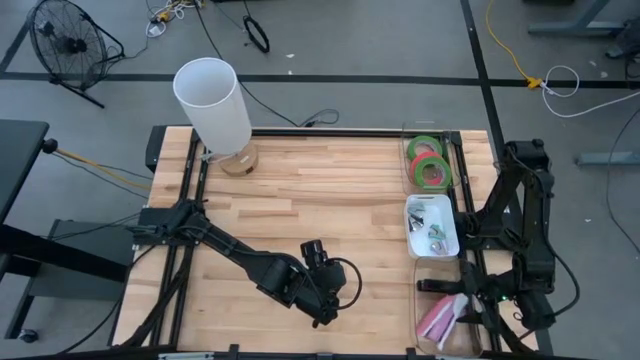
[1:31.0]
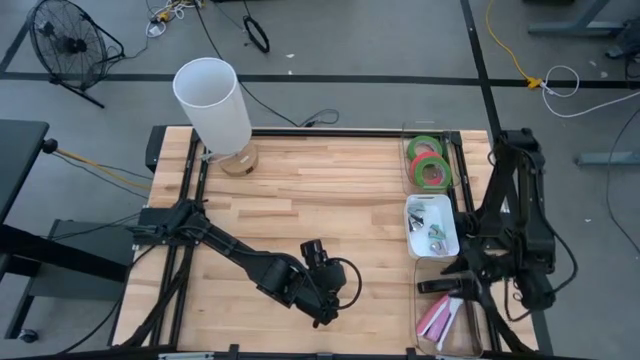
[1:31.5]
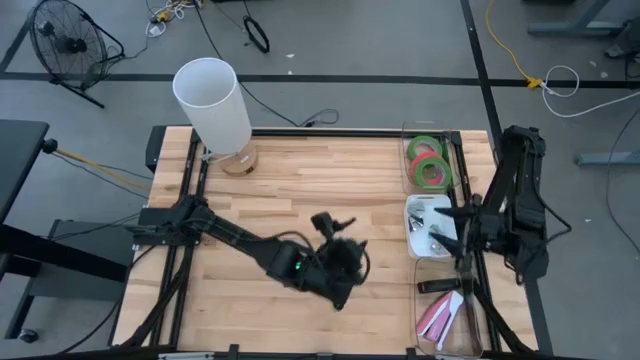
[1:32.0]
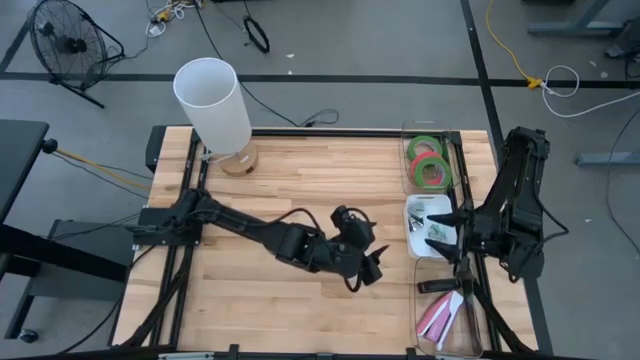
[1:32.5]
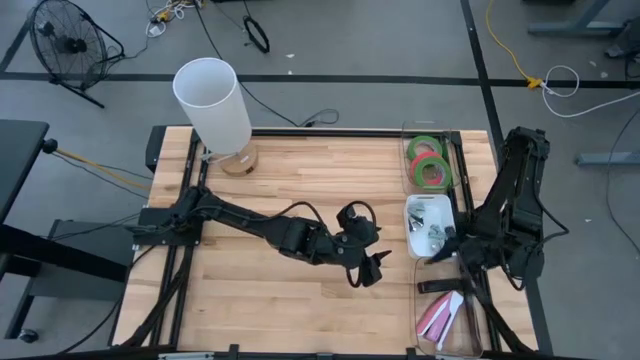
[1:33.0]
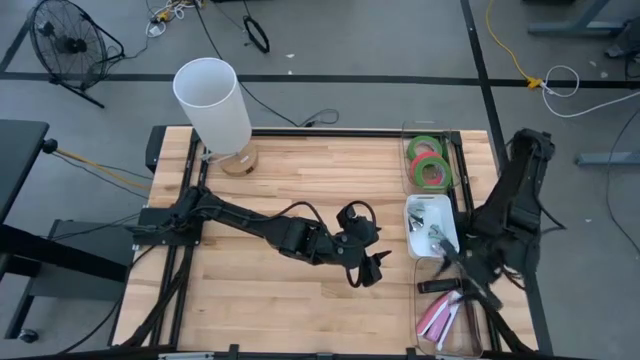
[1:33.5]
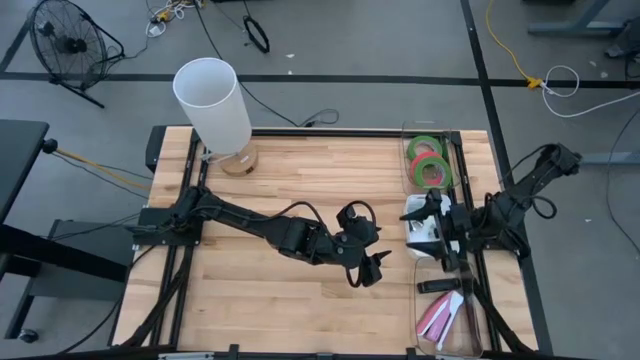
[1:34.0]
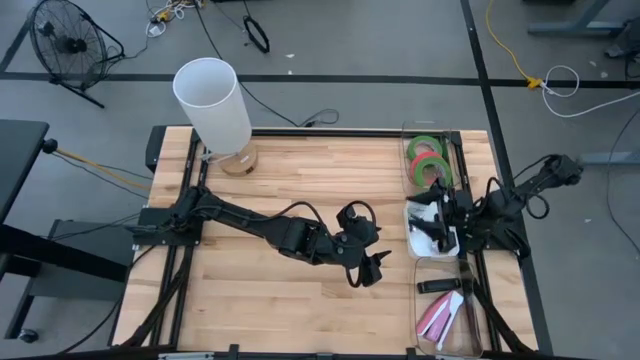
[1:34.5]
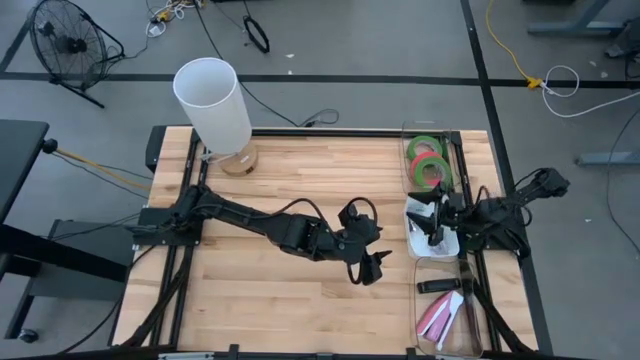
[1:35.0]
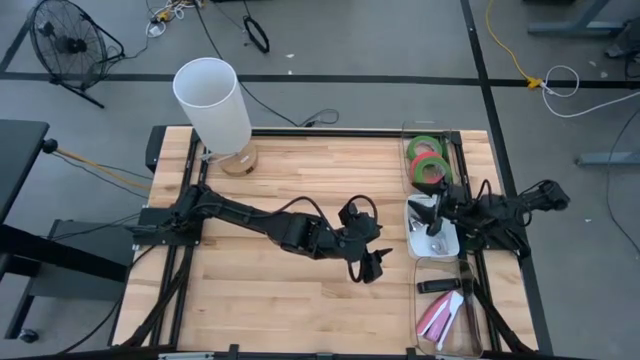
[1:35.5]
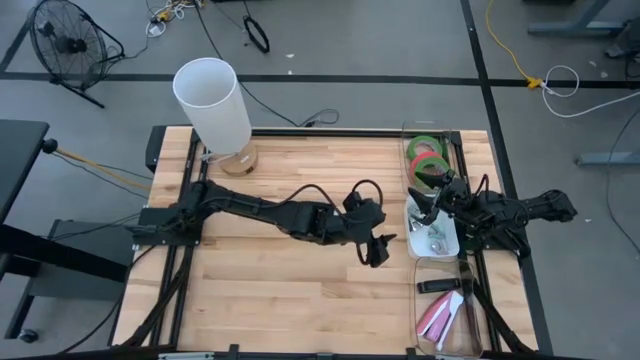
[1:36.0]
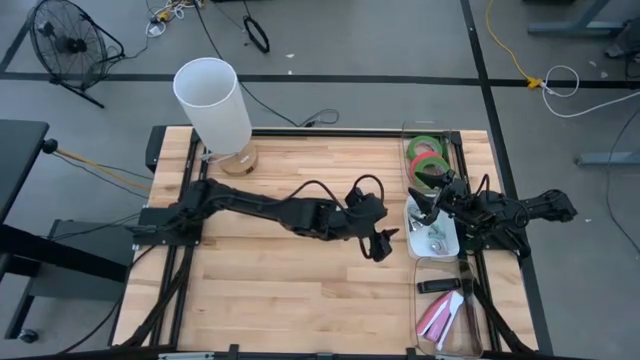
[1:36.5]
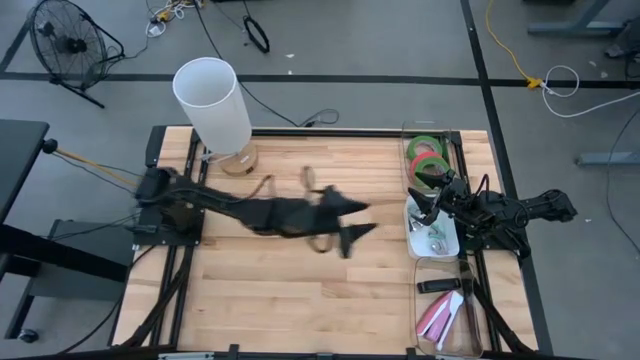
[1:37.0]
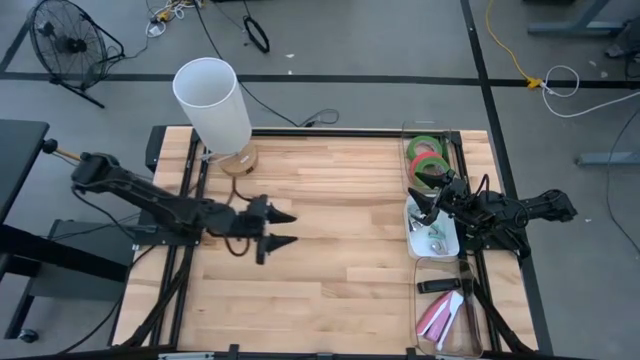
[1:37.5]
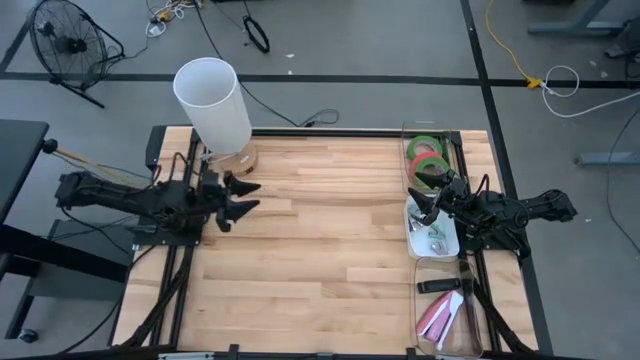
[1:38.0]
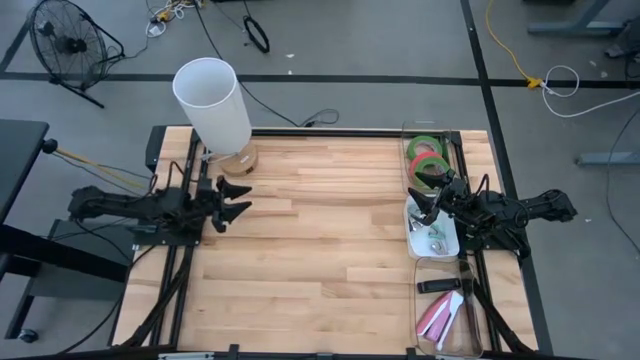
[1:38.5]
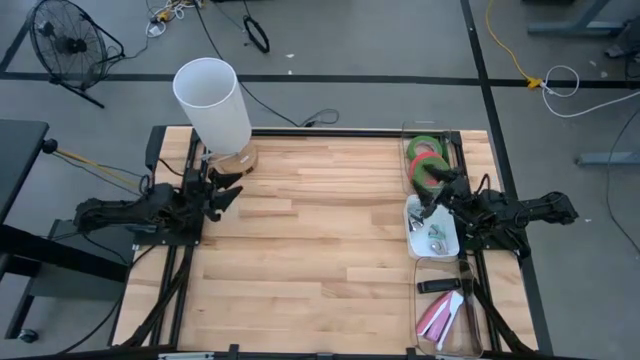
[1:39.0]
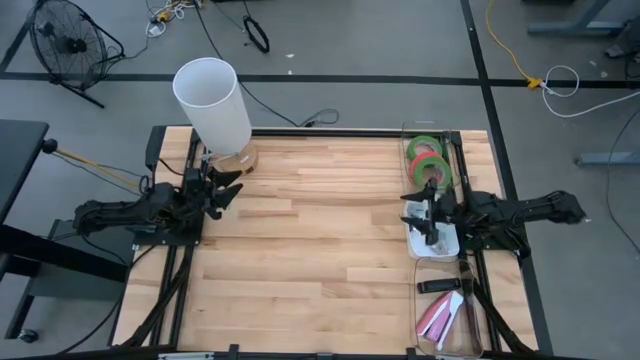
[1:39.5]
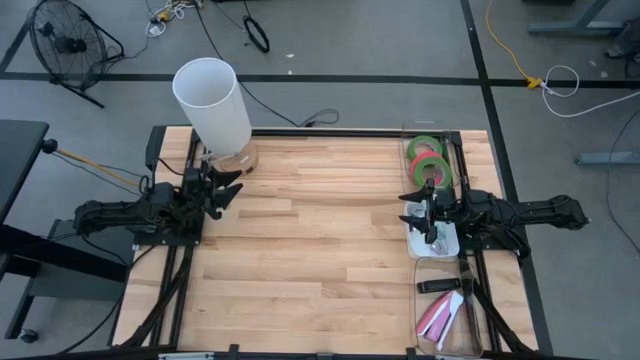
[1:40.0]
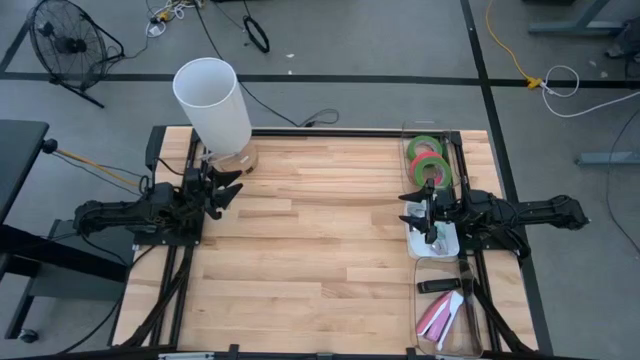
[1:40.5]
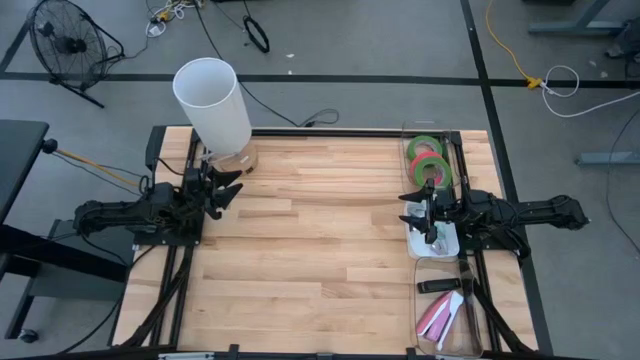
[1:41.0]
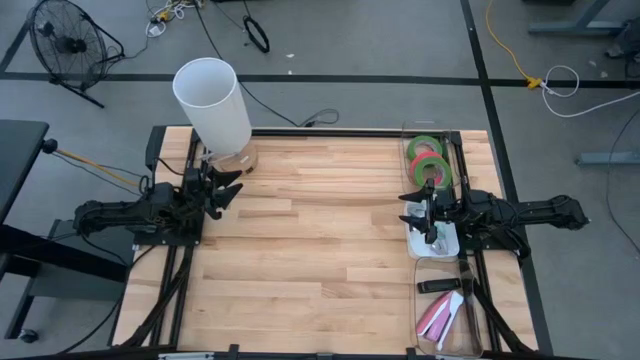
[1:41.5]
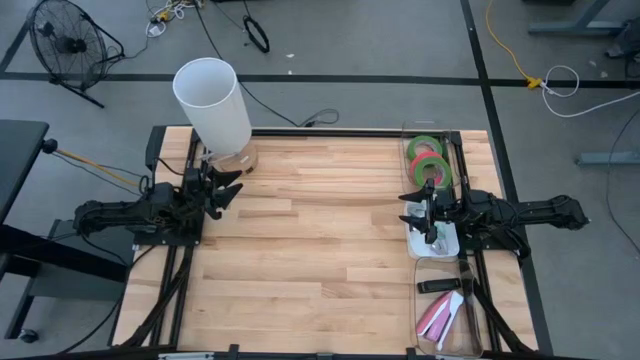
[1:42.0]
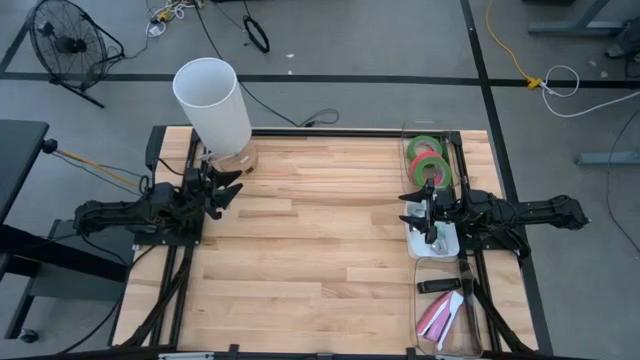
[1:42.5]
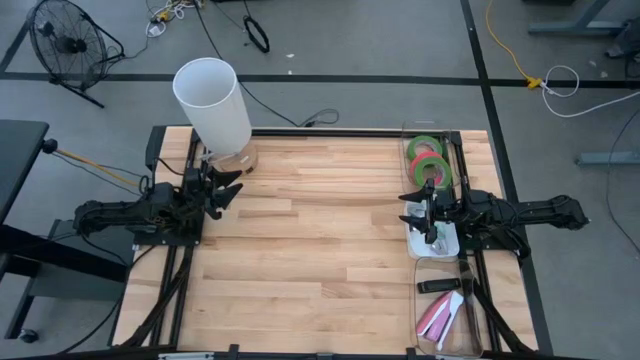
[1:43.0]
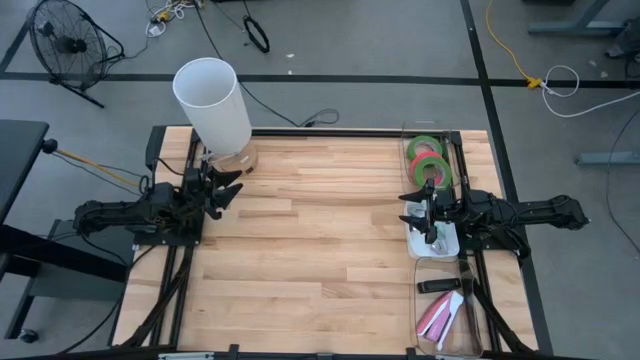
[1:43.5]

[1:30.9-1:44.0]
Task: Pick and place Stapler, Stapler remover, tape
Return to Home Position

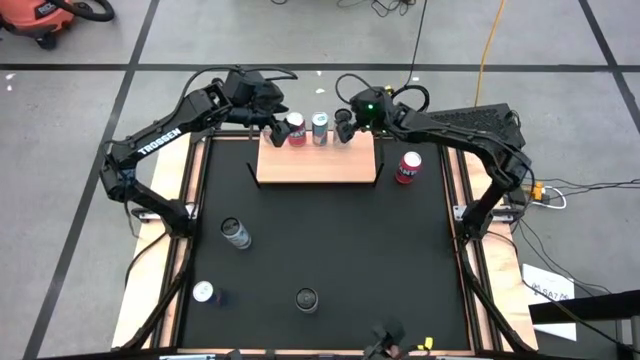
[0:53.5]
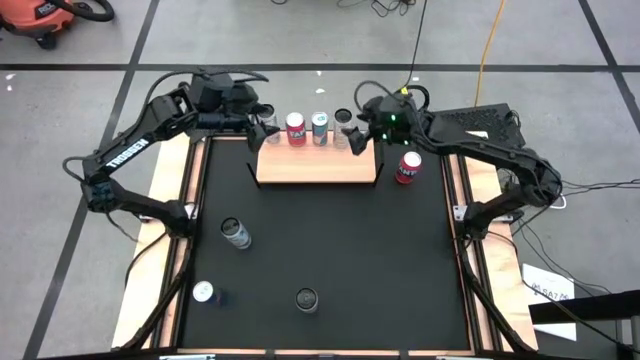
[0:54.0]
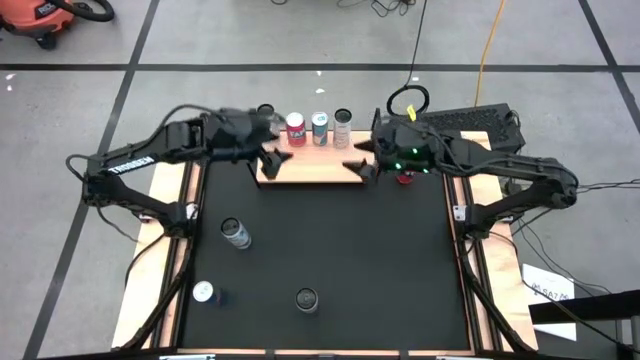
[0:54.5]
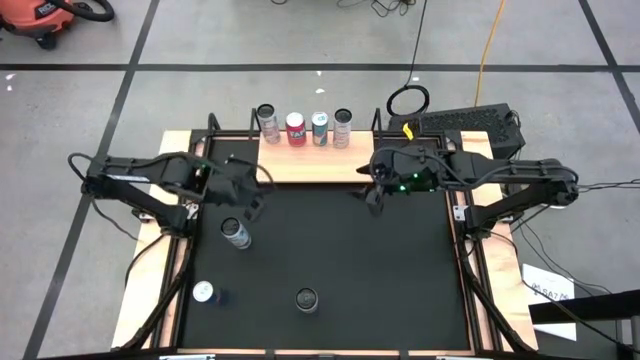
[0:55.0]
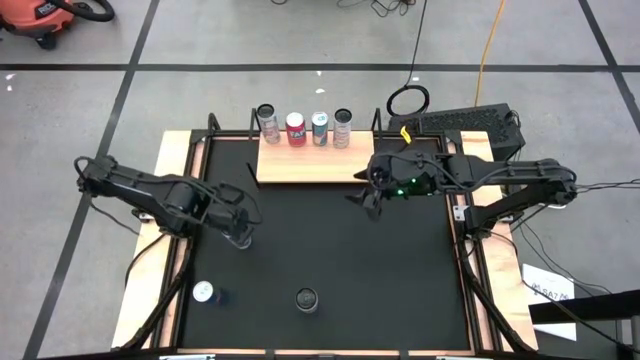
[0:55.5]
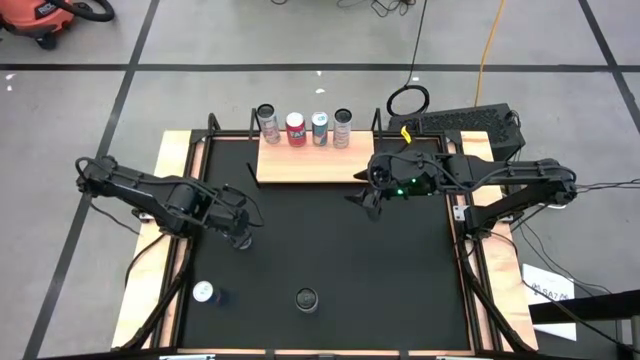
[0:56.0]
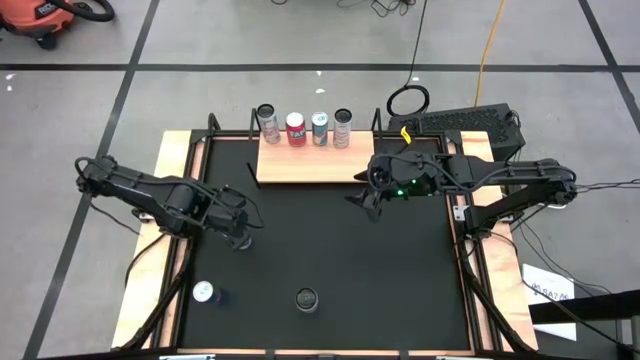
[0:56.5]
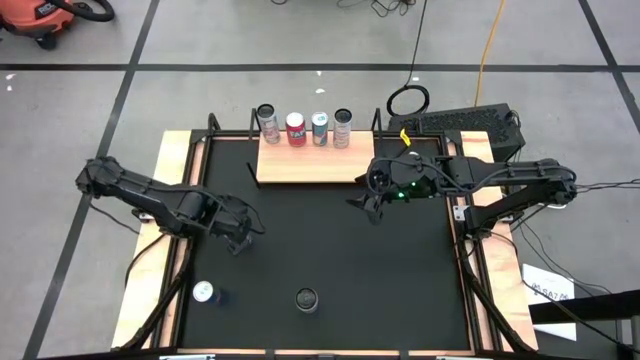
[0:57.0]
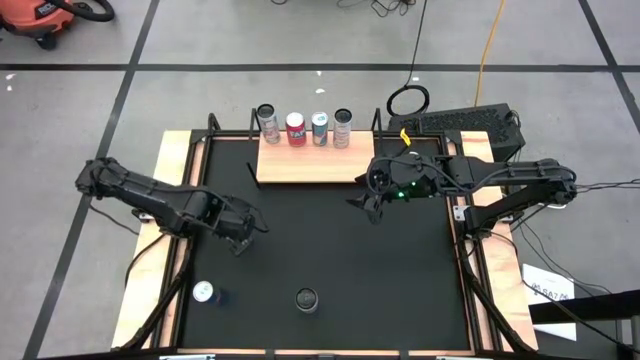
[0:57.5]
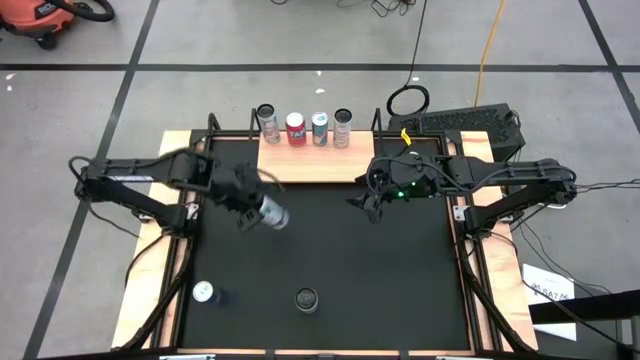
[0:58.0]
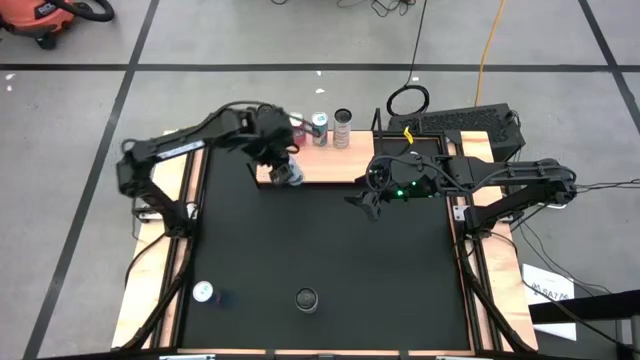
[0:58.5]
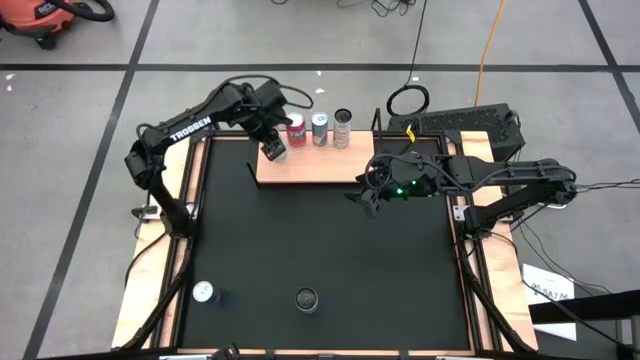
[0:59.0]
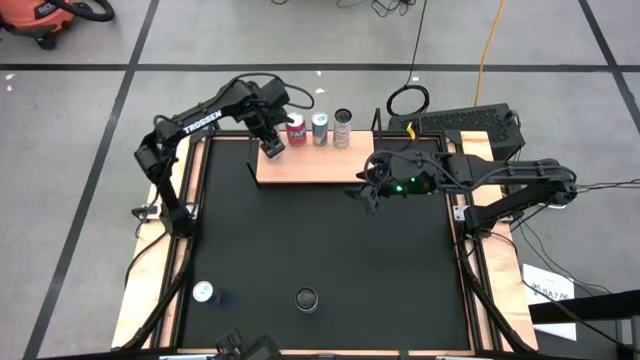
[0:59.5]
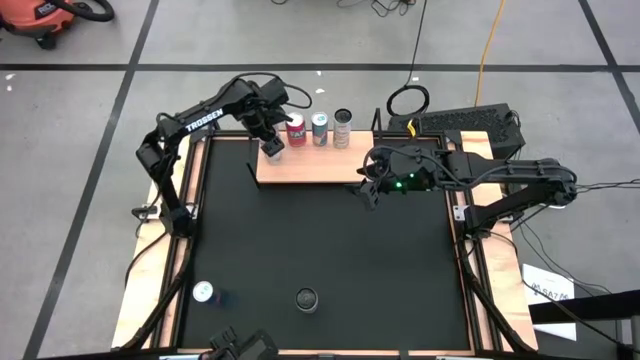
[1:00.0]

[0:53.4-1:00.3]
Task: Place canned beverage on shelf
Put the white-pink soda can aligned with the other white-pink soda cans on the shelf
